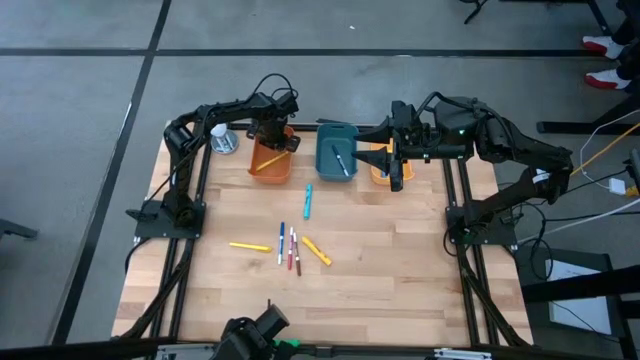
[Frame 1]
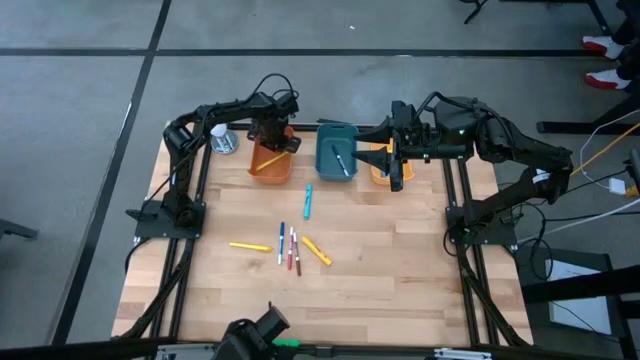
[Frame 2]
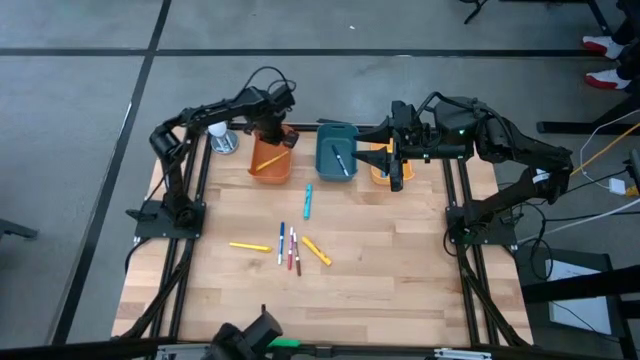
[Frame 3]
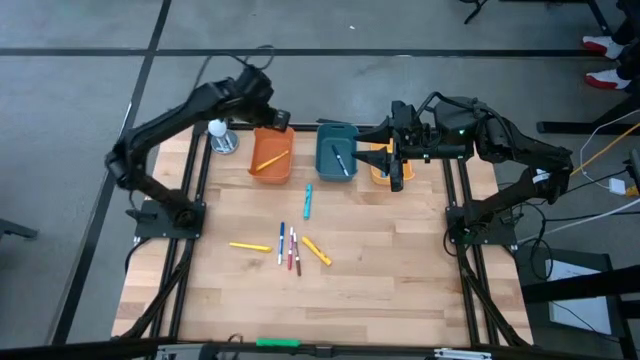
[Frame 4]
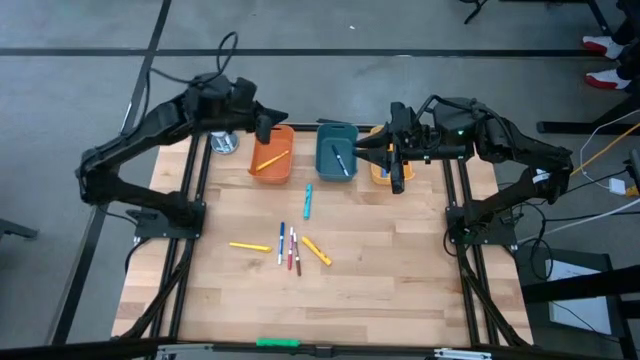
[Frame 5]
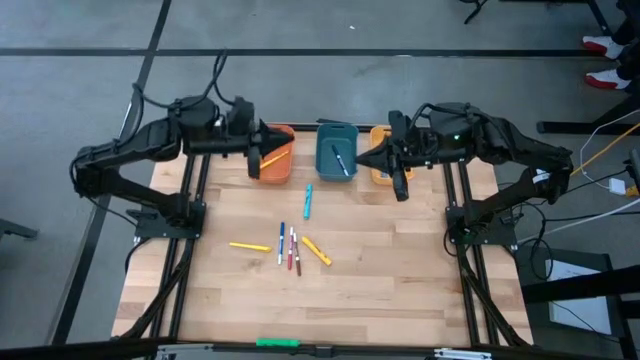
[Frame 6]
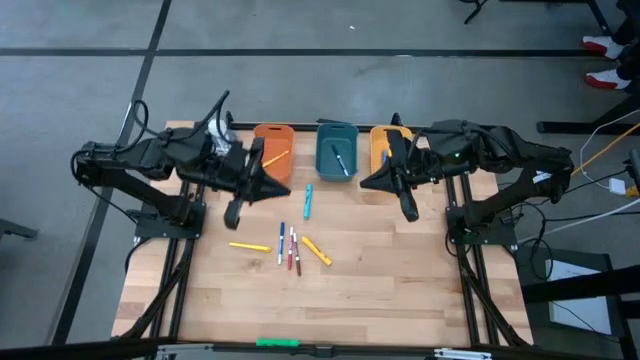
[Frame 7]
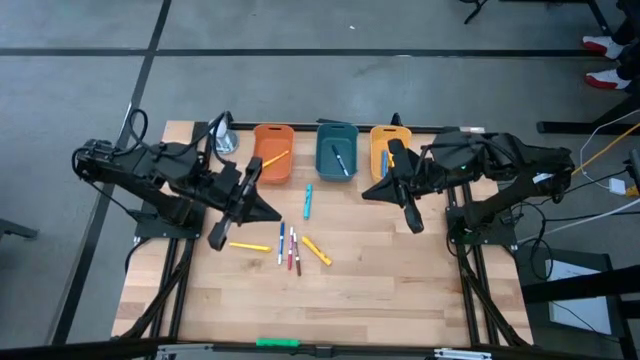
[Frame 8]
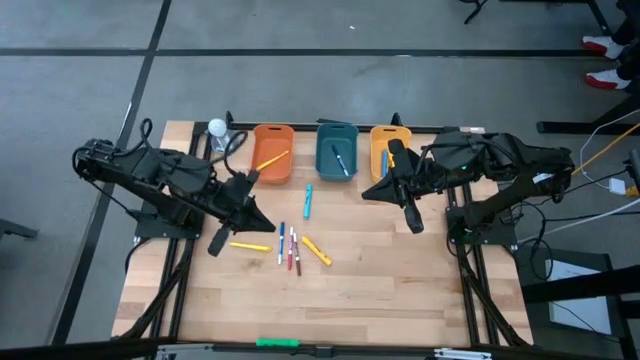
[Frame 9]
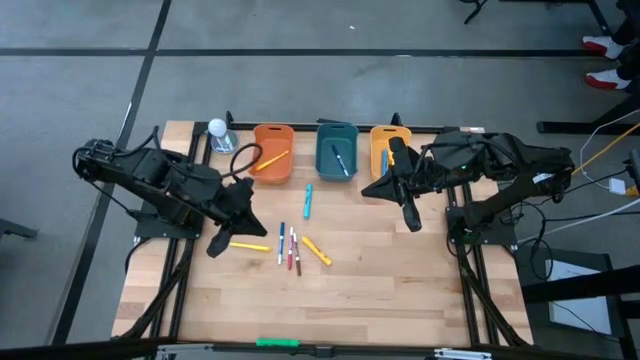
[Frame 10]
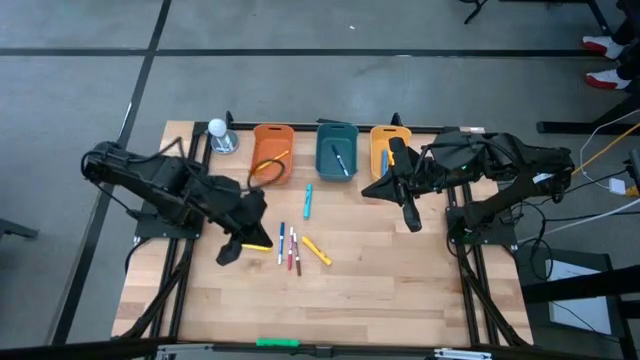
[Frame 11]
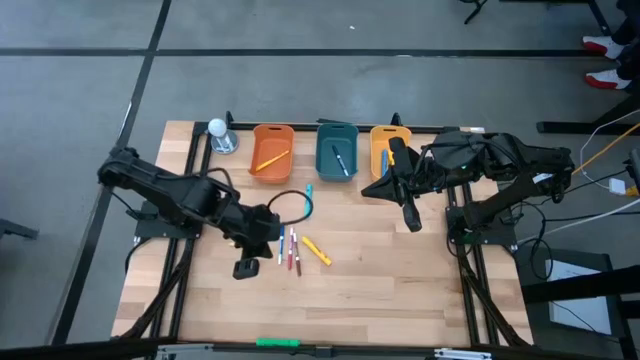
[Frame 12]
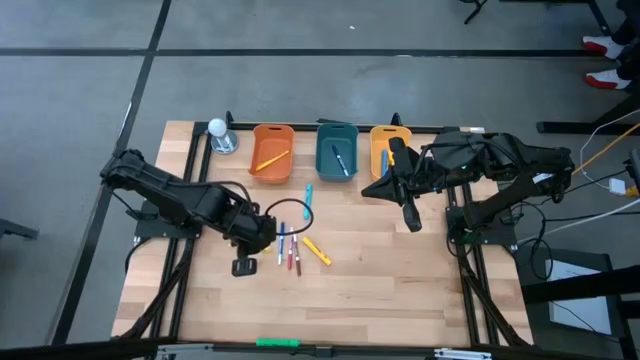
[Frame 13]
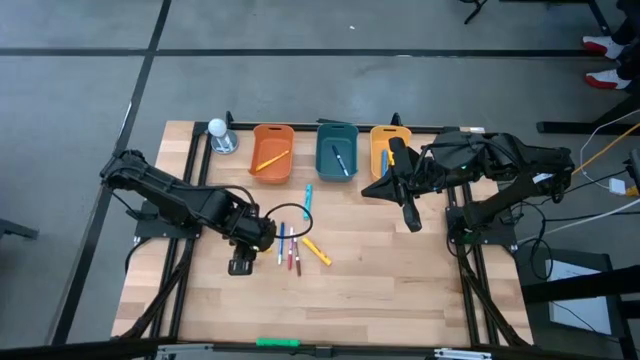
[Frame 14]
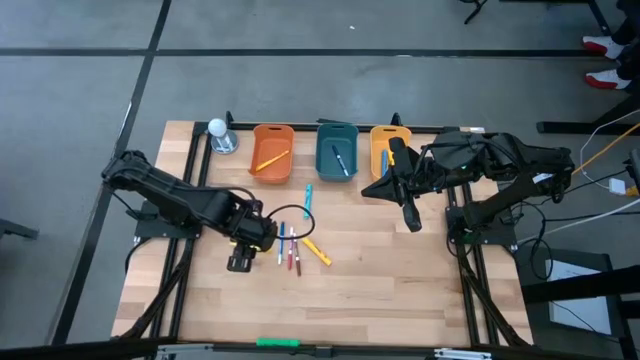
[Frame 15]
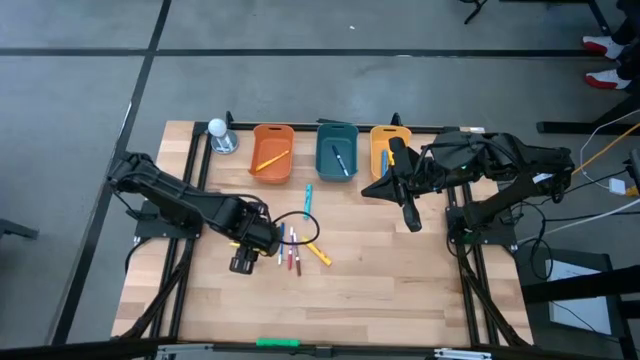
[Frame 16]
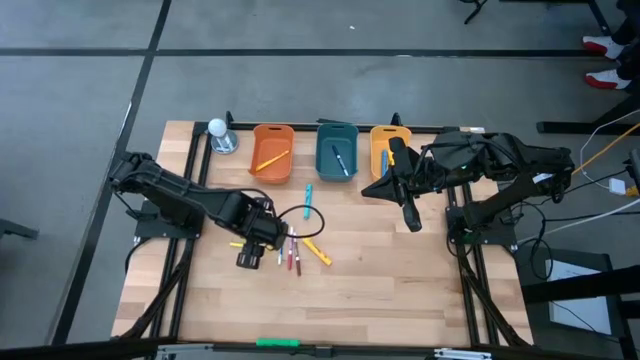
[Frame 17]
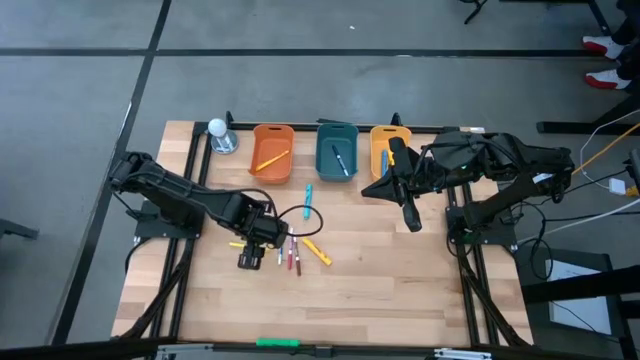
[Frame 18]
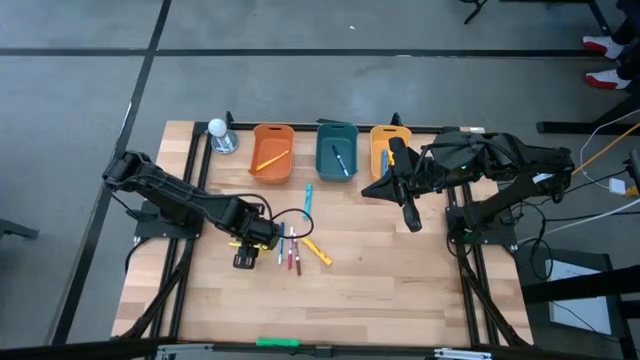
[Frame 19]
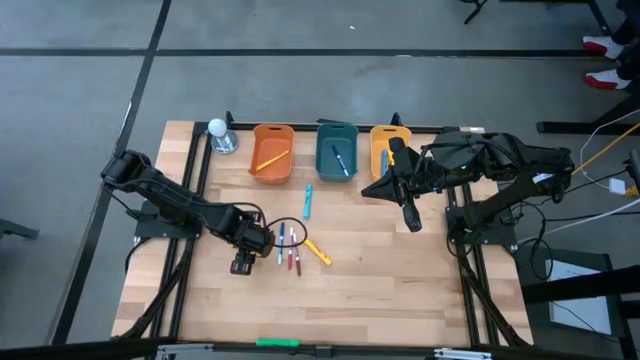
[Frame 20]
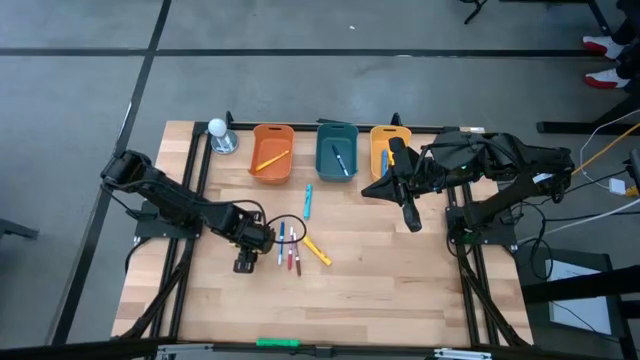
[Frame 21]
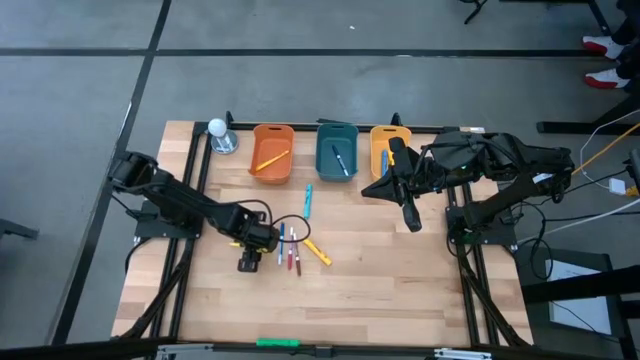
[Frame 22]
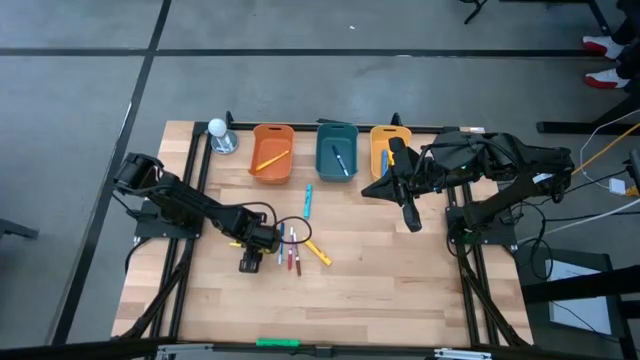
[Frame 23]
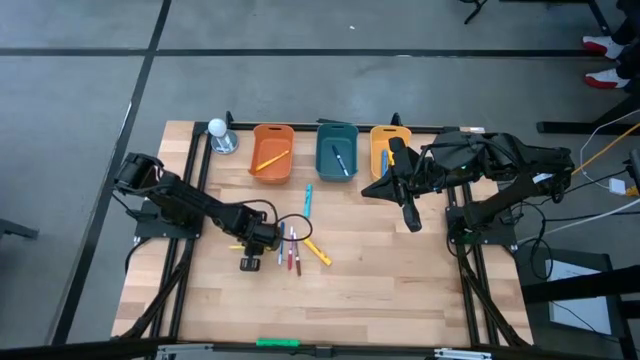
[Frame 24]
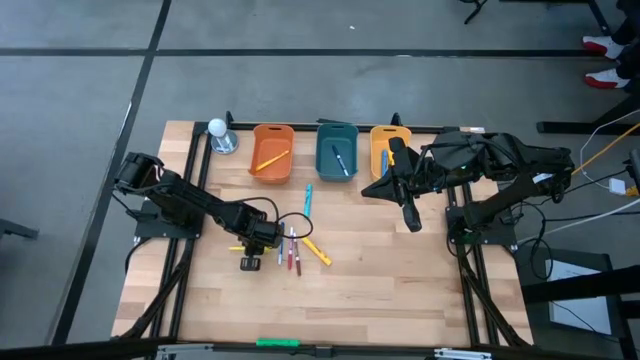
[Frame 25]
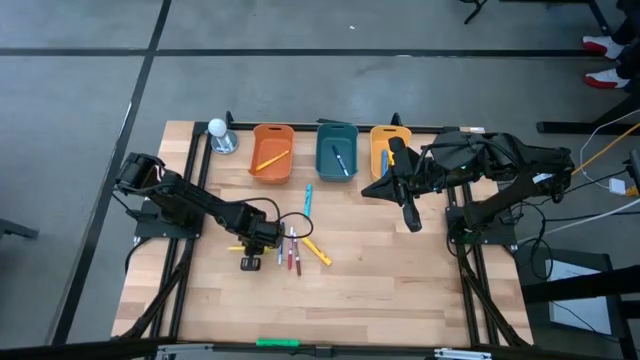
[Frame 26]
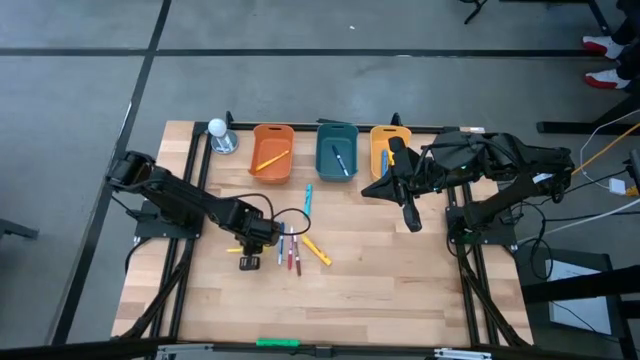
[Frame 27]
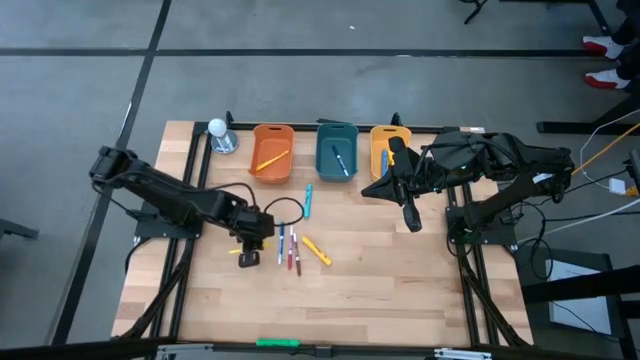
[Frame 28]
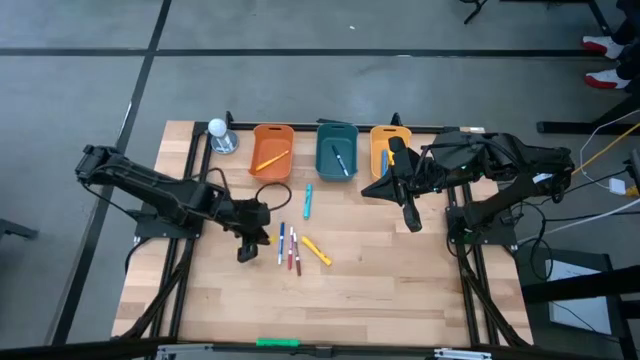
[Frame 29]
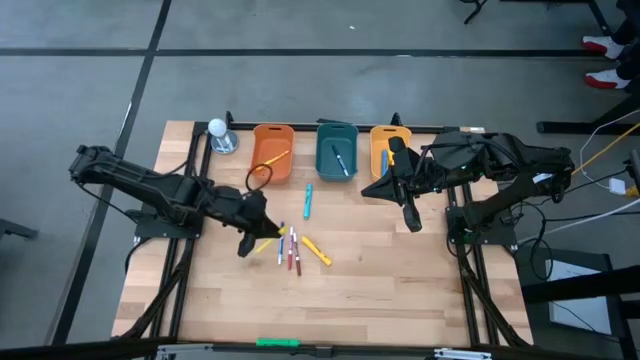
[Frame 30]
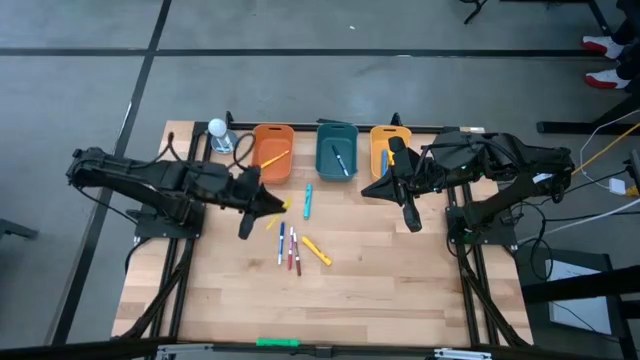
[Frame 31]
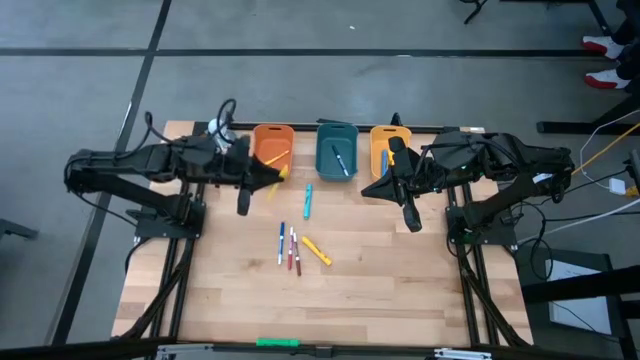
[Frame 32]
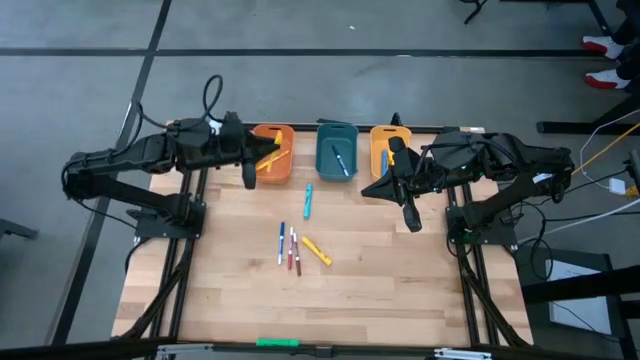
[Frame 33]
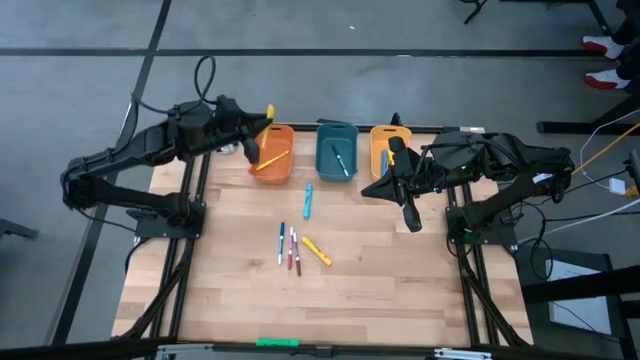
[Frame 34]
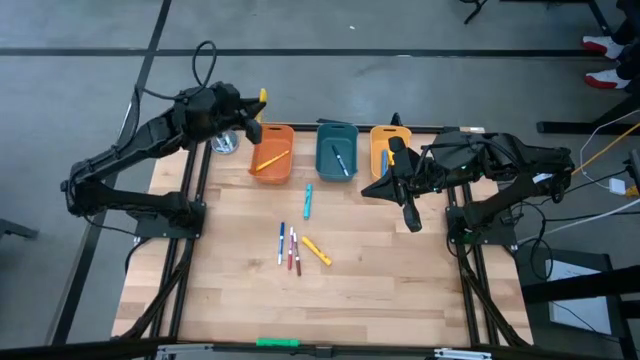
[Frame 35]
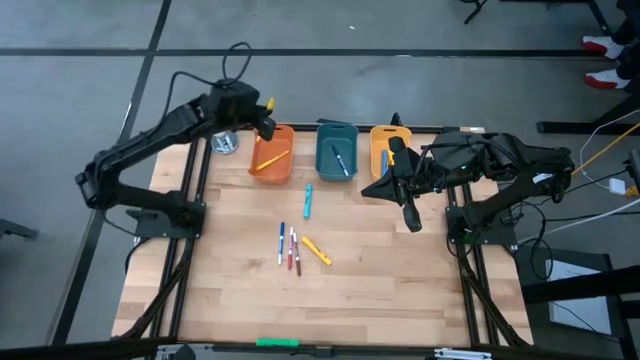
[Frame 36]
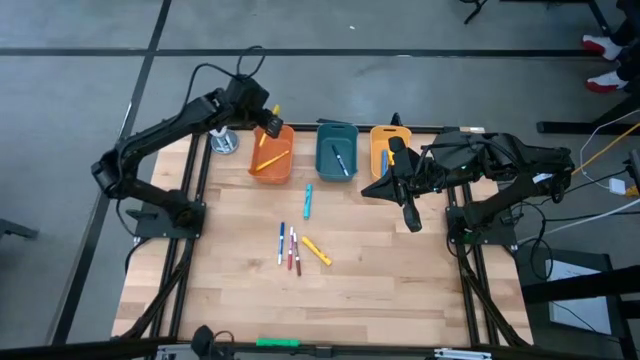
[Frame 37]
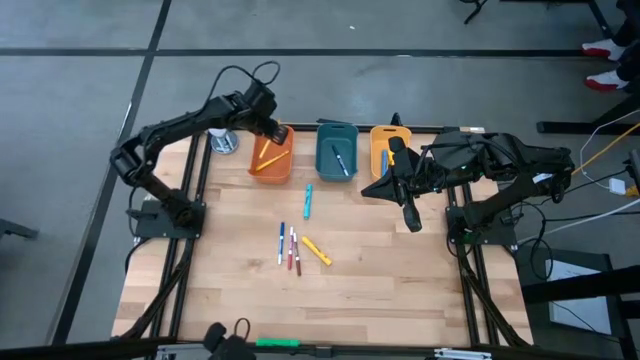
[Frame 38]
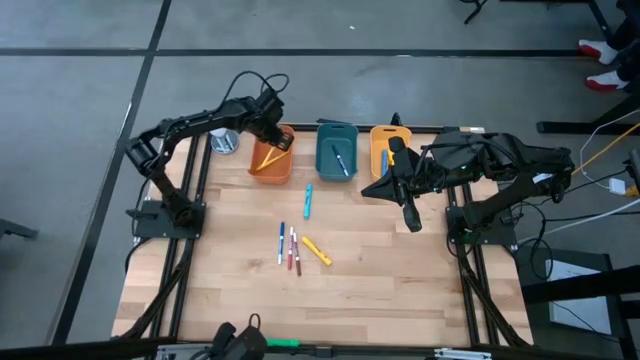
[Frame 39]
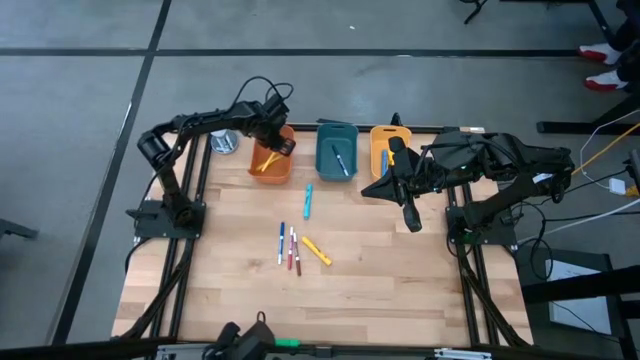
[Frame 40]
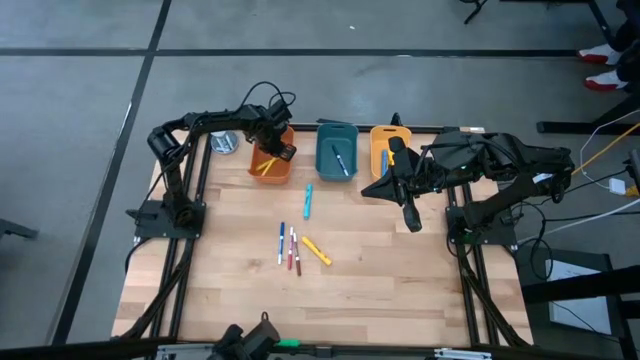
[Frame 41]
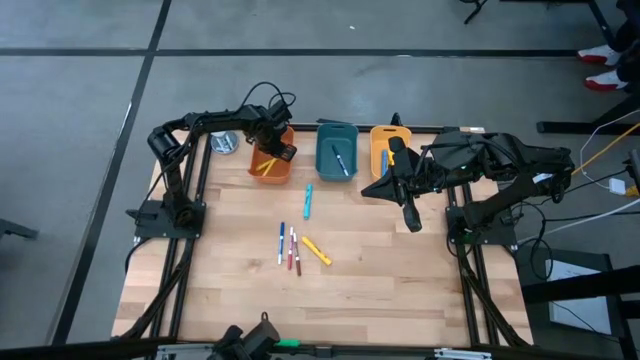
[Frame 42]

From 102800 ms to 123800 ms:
Task: Pick & Place Markers
Put the yellow pen into the orange bin
